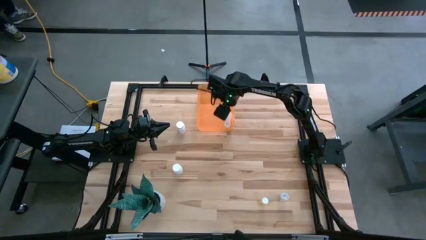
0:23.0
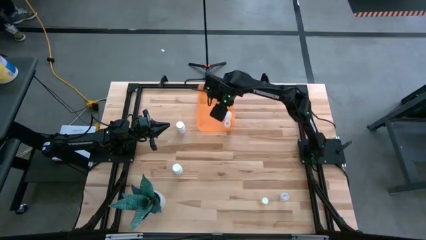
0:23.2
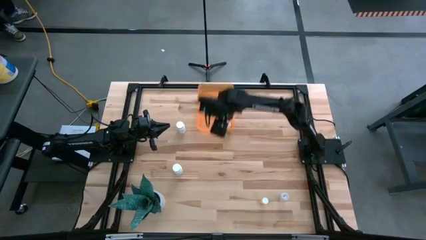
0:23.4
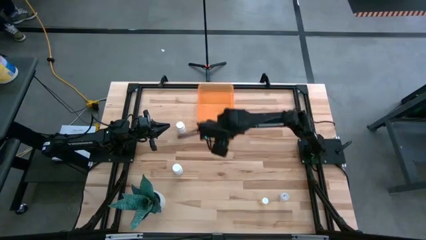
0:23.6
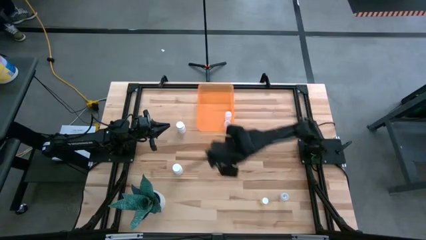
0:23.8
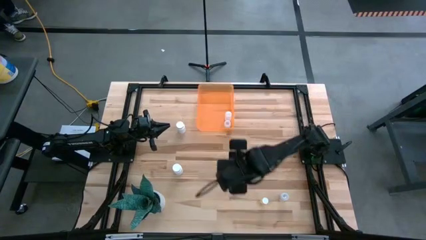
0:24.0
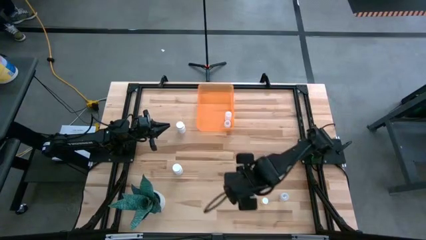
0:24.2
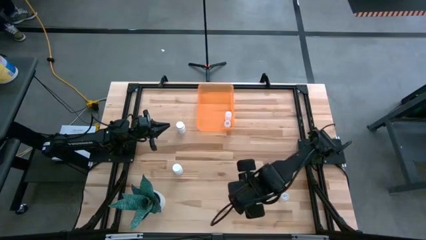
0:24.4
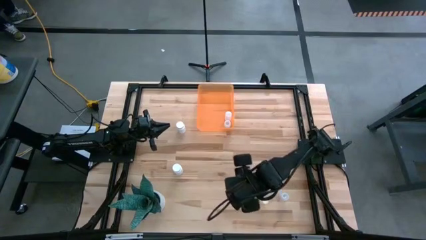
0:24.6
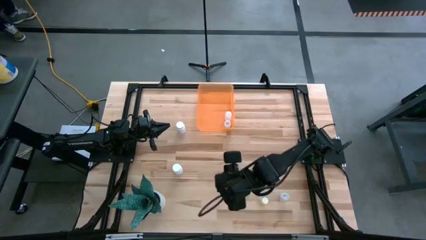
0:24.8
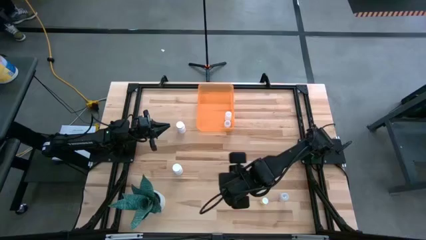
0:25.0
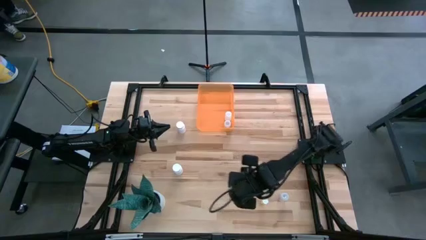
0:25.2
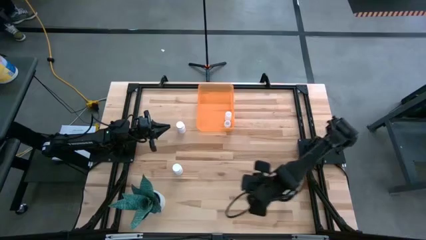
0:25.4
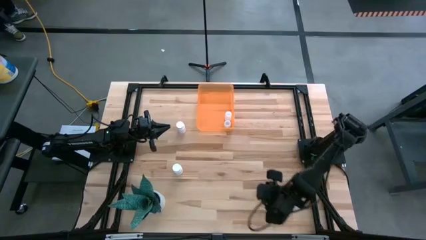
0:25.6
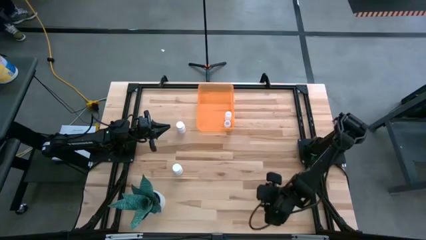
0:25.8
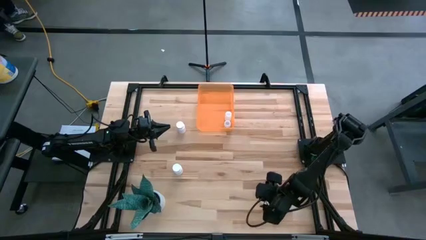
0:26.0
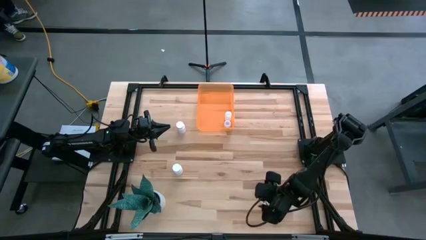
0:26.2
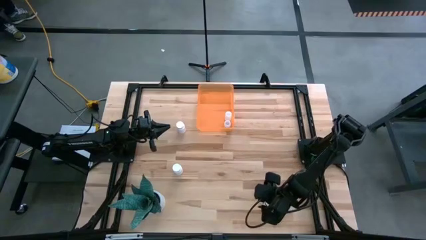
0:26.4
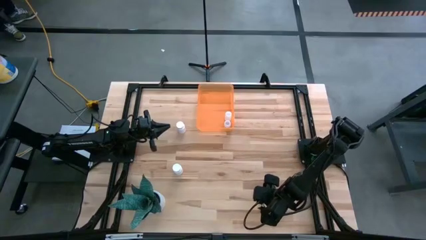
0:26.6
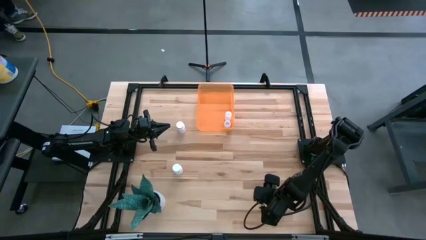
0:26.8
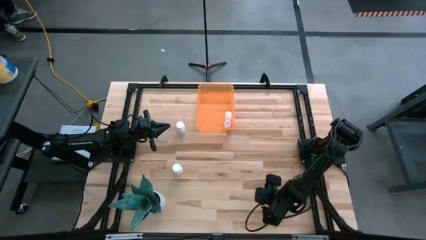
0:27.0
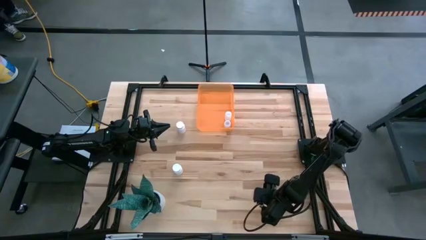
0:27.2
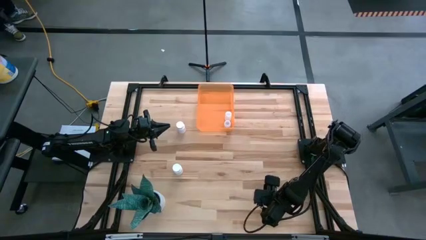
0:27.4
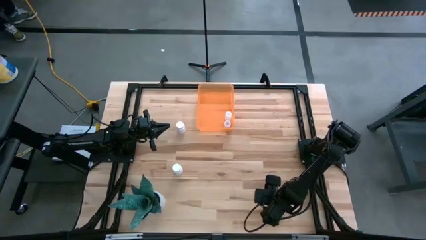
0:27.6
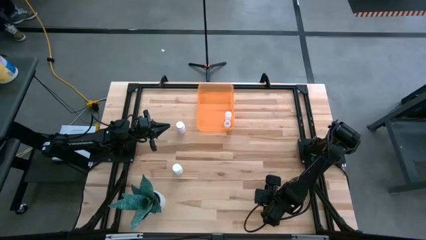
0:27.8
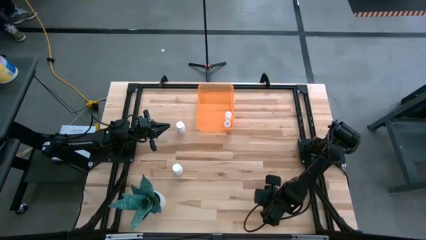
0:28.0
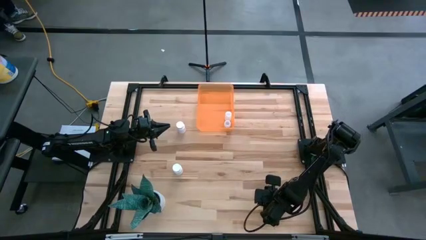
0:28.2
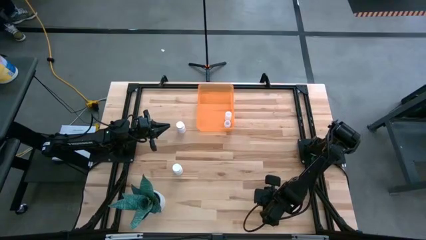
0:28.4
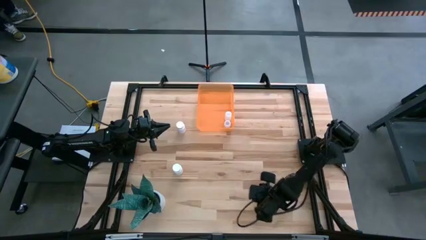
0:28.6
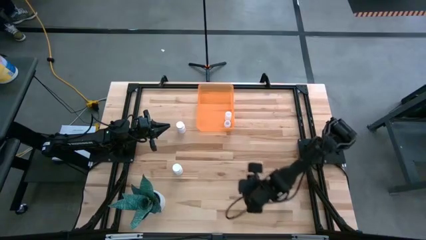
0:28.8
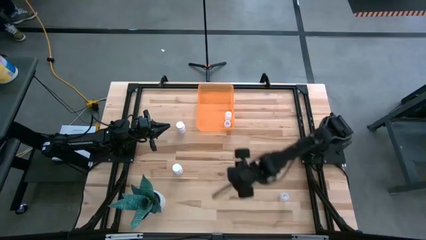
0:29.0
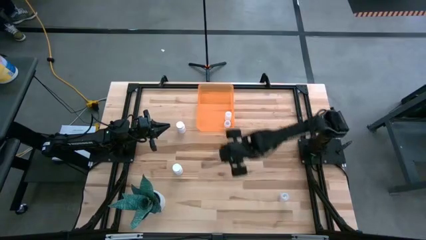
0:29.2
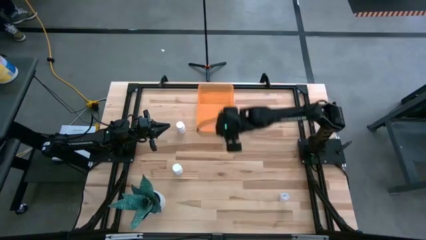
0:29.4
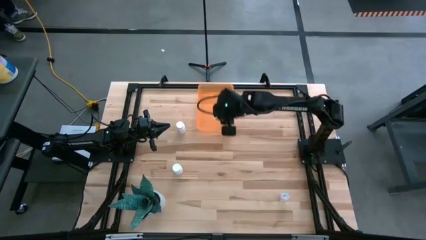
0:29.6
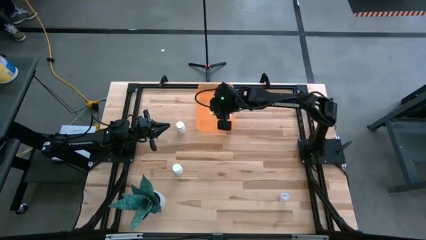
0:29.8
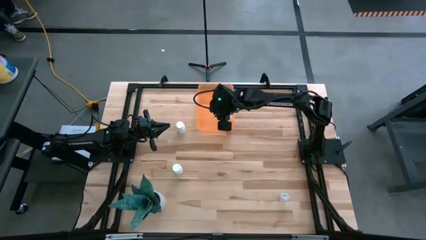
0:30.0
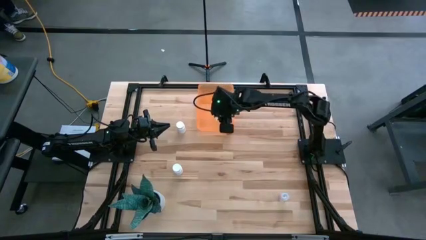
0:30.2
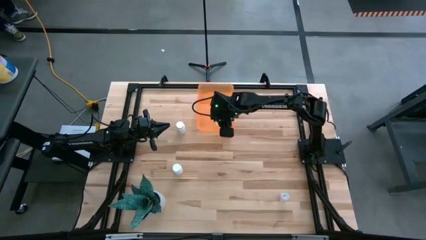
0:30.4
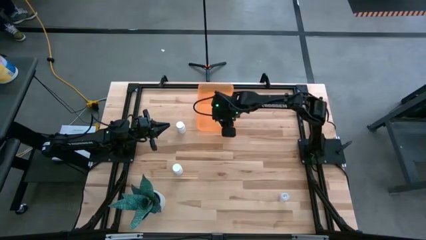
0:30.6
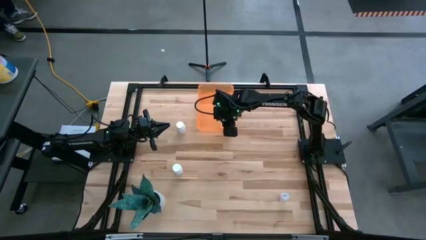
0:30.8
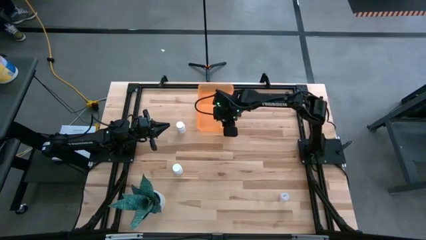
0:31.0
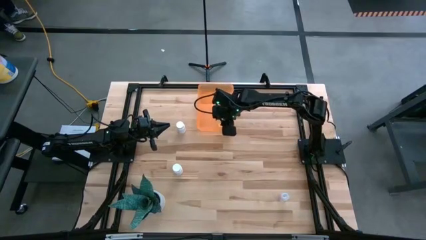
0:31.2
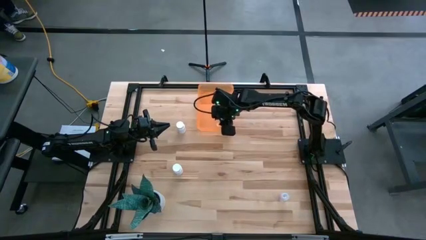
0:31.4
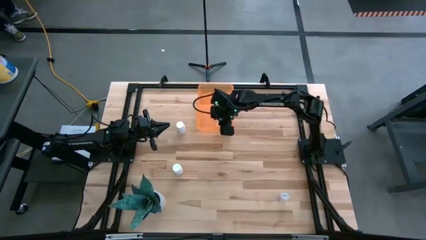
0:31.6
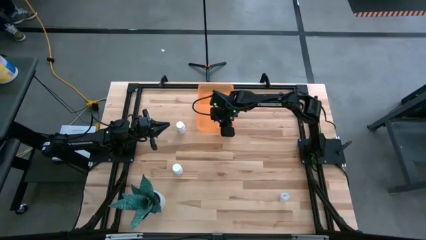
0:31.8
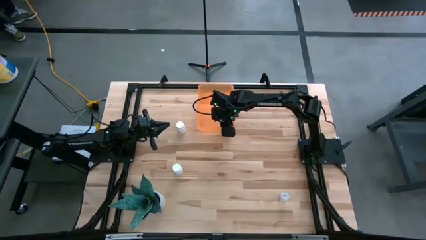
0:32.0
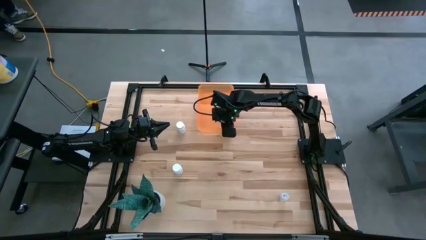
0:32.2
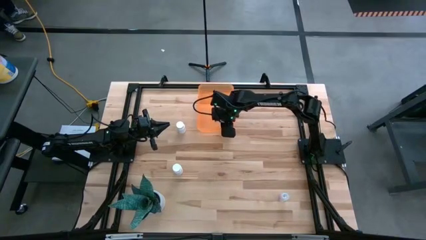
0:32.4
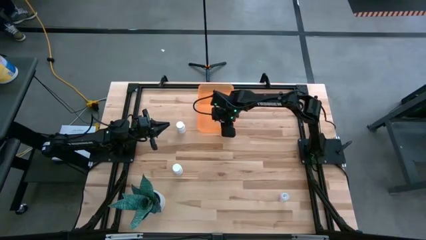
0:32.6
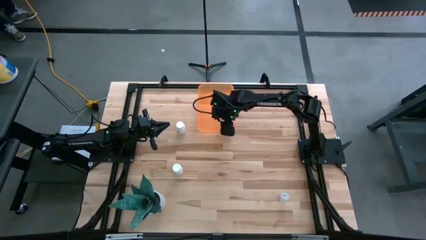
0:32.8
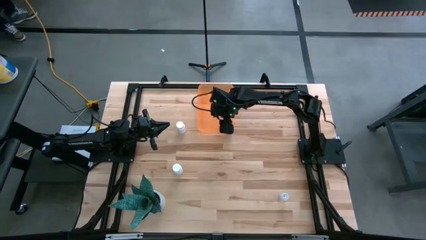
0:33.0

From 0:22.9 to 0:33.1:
Task: Pick and place pill bottles into a basket
Put the yellow pill bottle into the orange bin

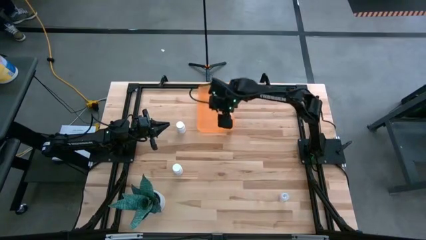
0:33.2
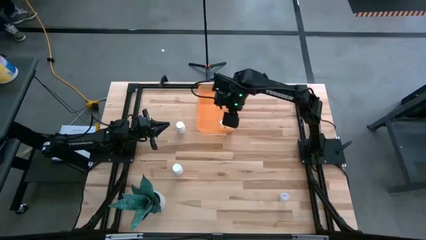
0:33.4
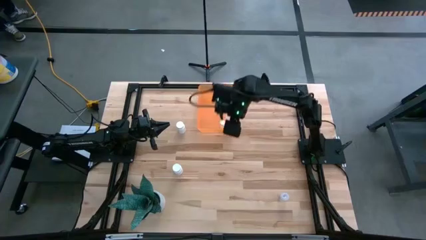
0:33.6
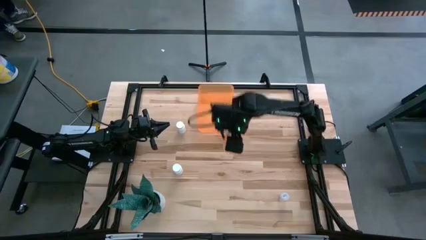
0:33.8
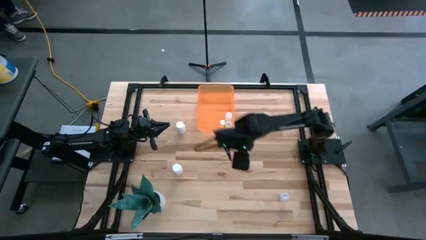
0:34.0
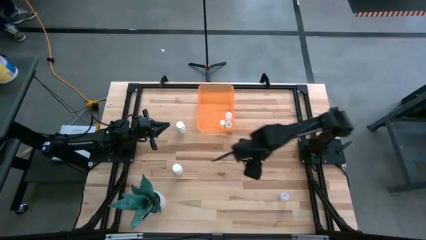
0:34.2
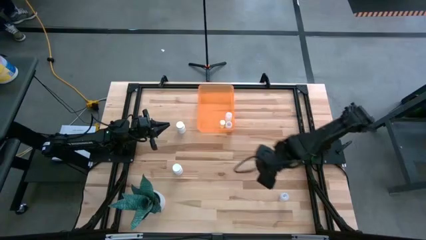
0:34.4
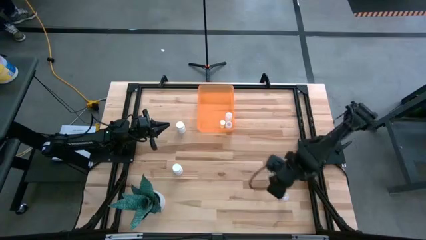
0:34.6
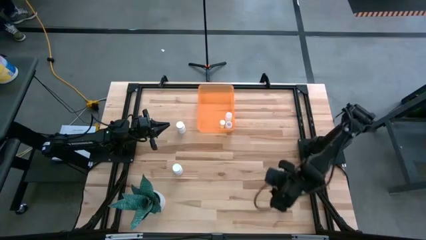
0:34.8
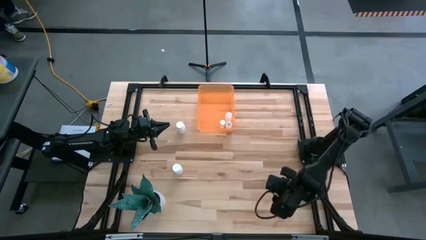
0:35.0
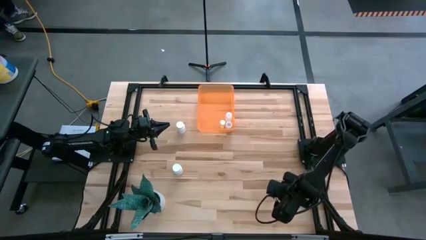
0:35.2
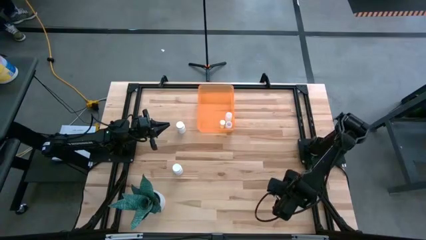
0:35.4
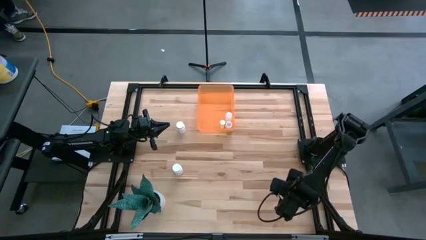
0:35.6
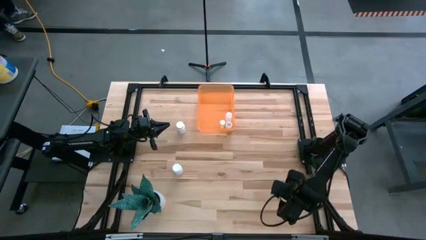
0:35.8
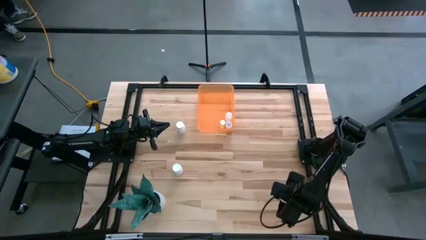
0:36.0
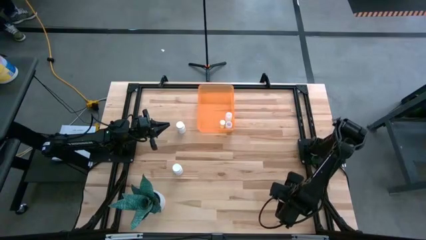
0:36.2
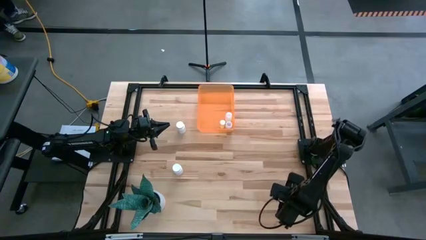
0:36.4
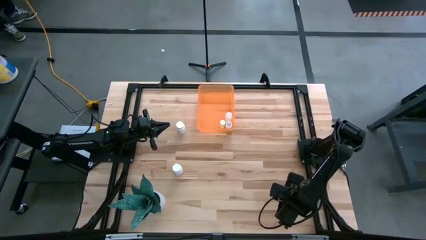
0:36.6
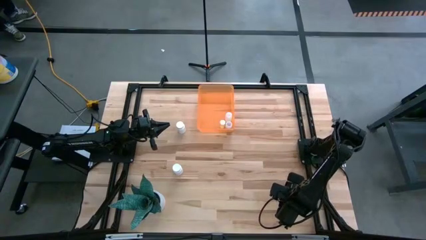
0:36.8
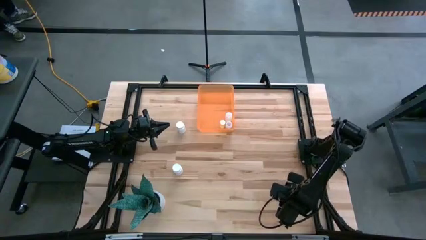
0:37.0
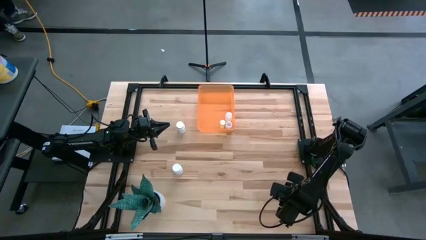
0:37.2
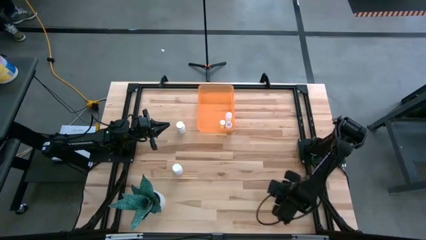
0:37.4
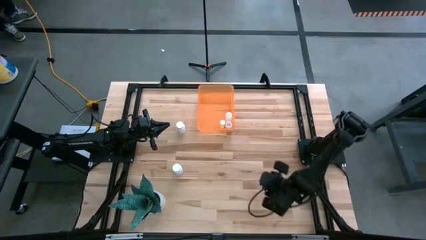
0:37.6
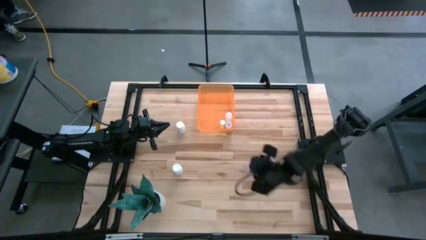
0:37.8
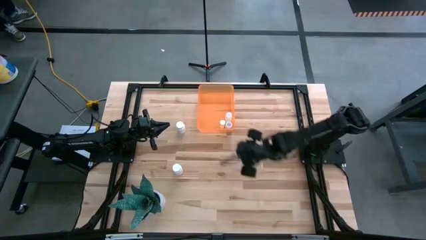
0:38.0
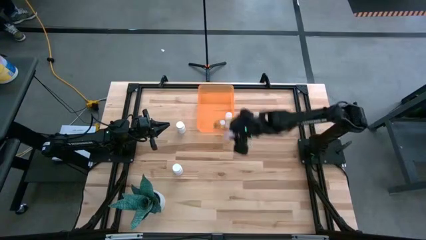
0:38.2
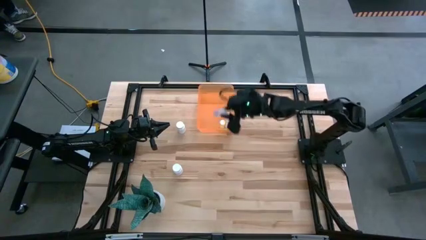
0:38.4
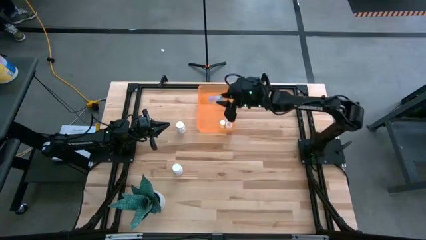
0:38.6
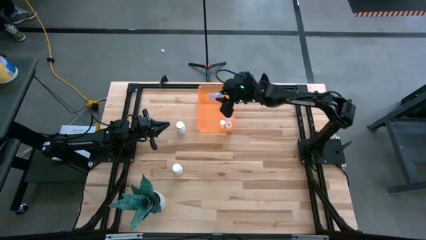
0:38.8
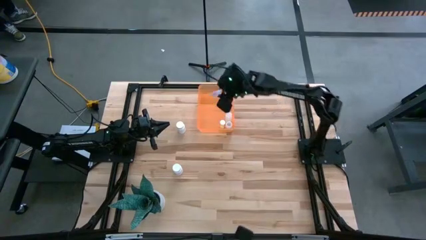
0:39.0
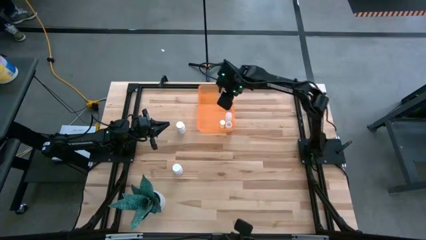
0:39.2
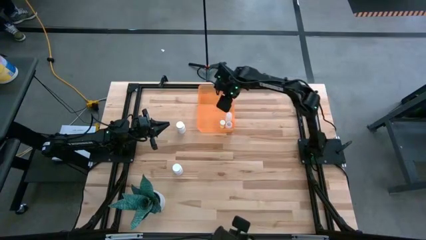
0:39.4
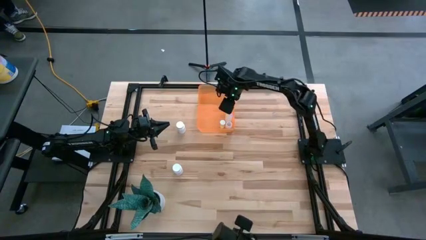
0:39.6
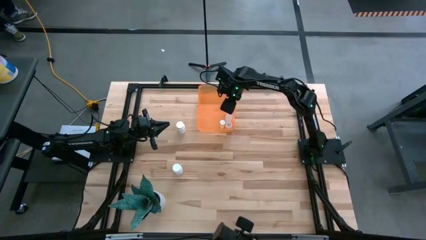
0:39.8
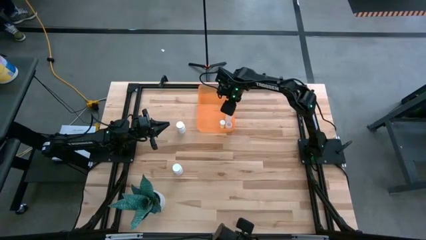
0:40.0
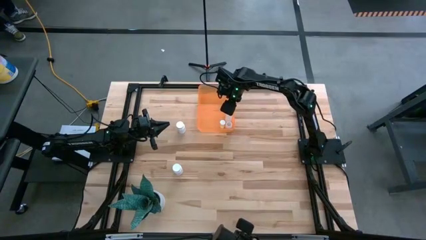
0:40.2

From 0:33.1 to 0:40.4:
Put the transparent pill bottle into the orange bin
